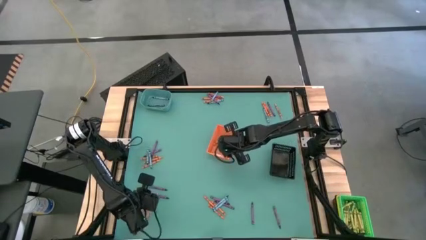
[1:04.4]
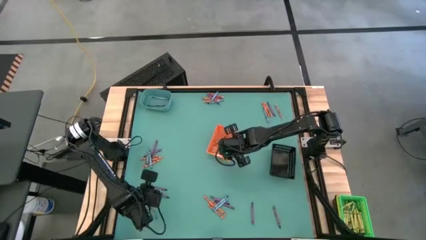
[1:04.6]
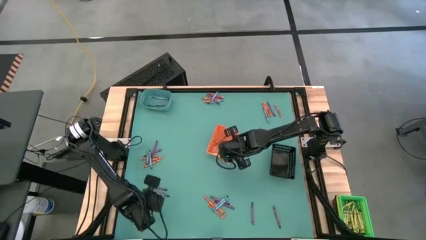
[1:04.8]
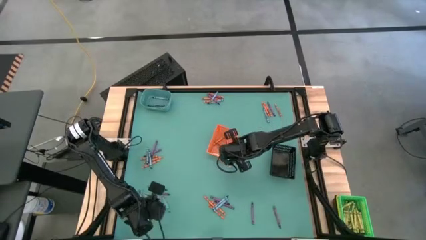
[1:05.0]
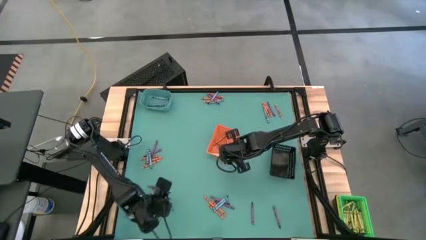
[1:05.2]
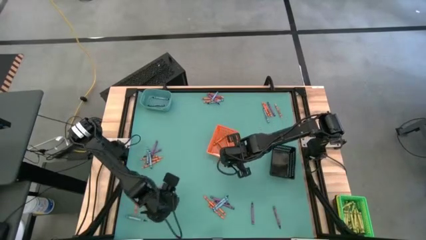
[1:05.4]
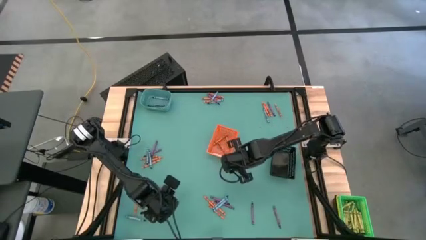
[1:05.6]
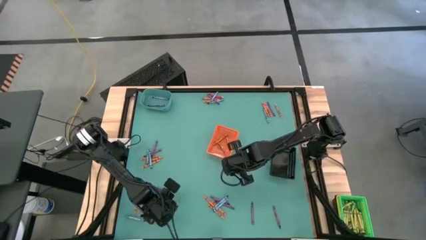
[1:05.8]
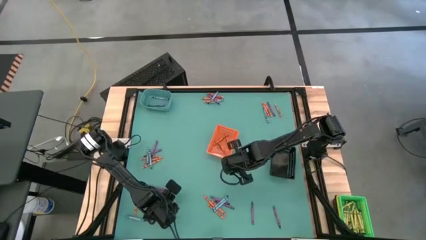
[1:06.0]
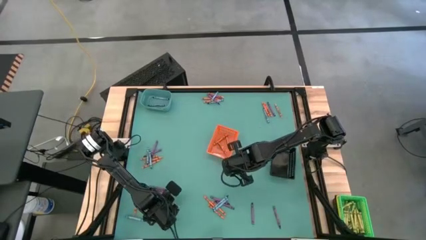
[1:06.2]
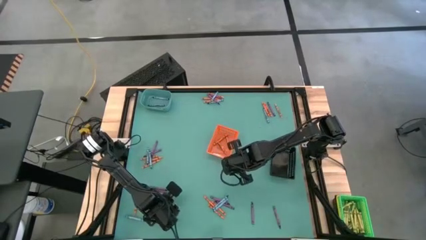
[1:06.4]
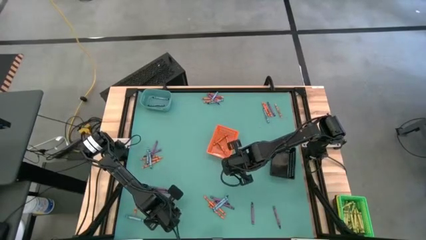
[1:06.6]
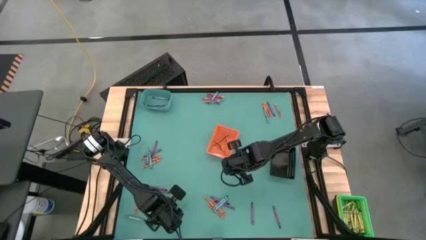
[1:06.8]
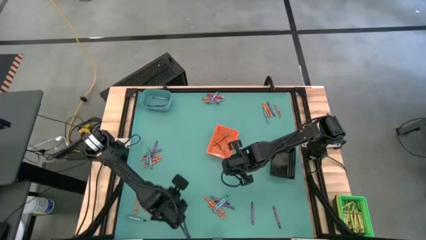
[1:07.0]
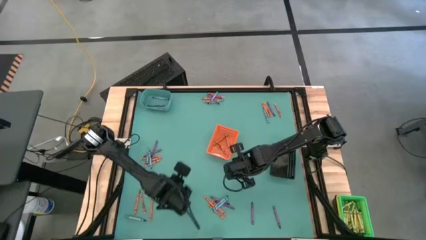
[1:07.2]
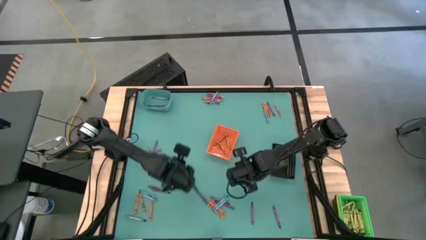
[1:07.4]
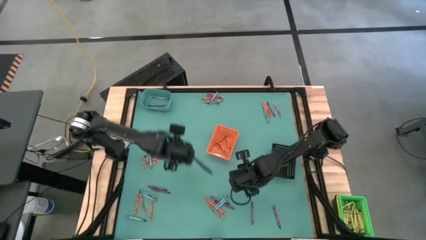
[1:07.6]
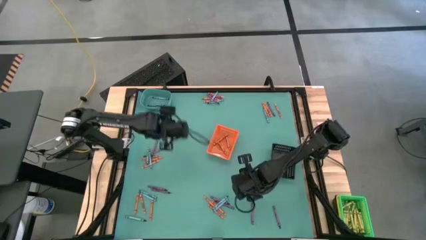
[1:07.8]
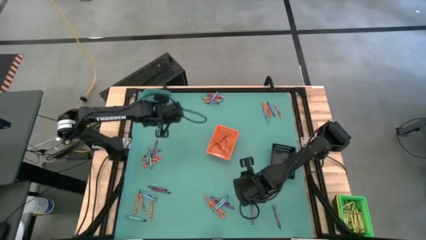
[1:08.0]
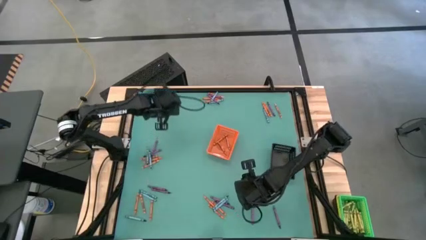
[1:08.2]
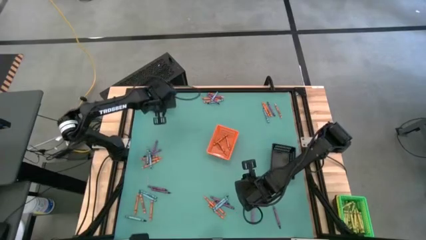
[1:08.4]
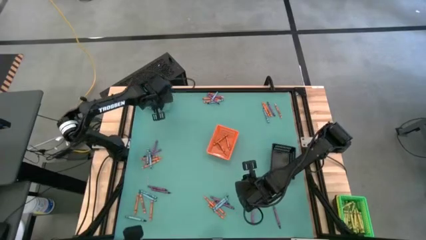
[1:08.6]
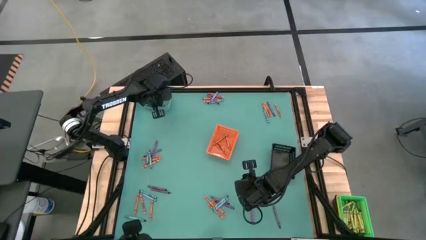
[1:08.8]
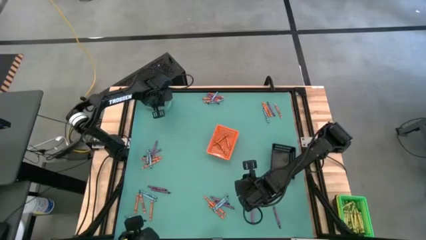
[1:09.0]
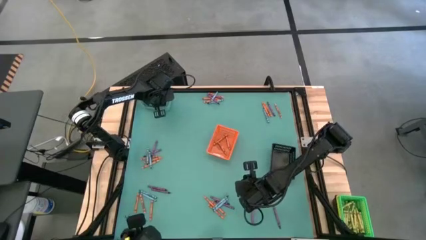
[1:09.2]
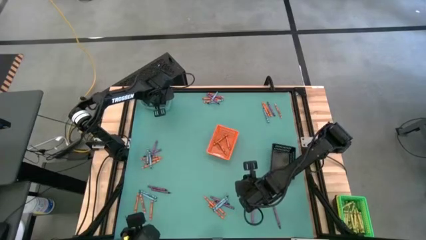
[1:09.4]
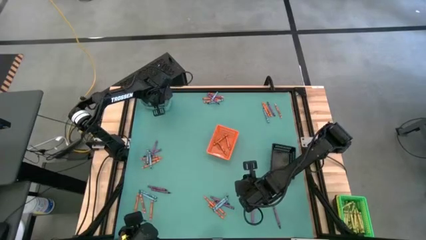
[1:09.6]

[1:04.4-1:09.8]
Task: Sort crayons
Put the blue crayon into the blue bin

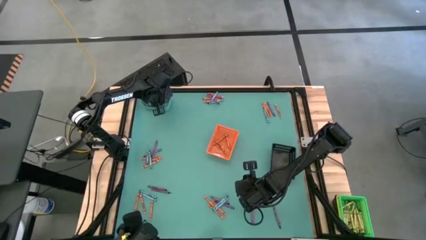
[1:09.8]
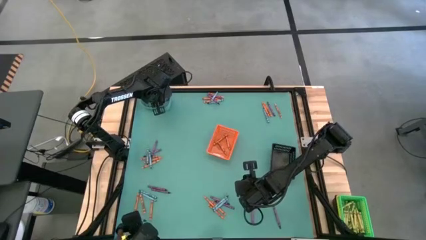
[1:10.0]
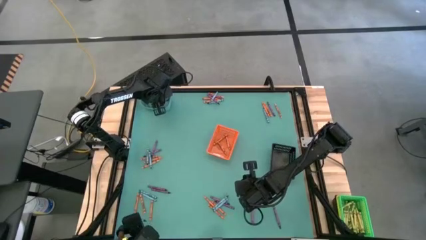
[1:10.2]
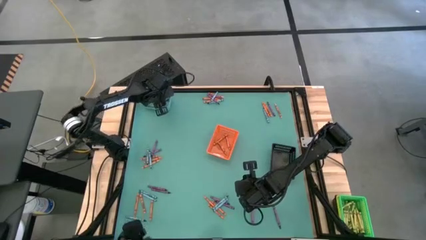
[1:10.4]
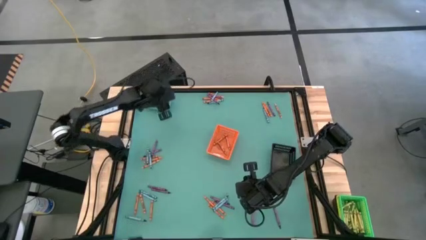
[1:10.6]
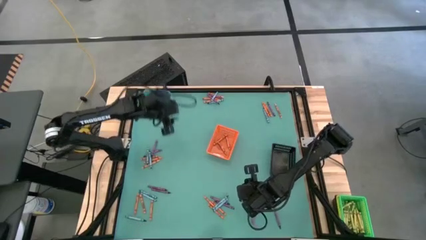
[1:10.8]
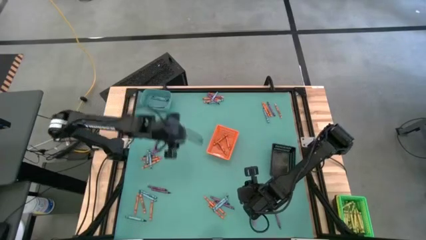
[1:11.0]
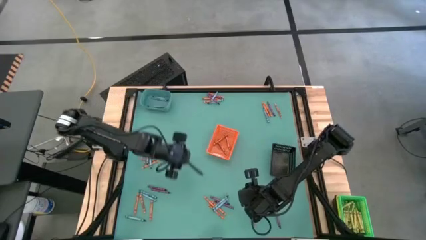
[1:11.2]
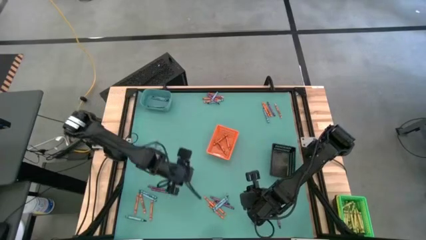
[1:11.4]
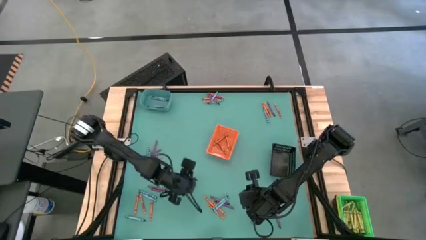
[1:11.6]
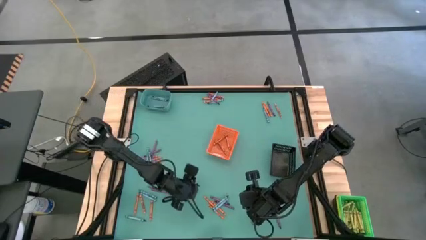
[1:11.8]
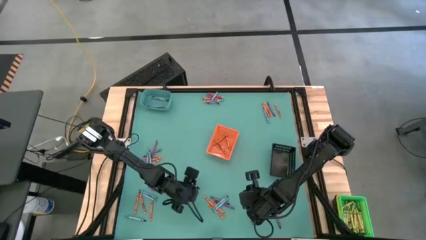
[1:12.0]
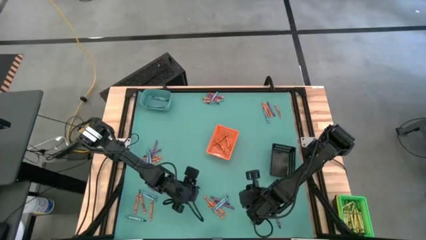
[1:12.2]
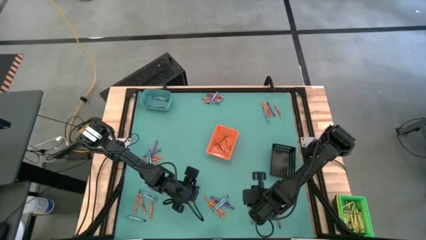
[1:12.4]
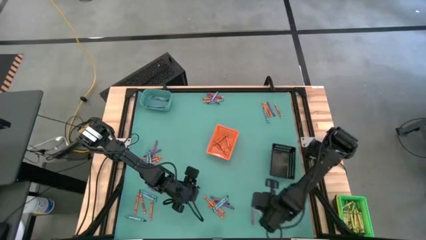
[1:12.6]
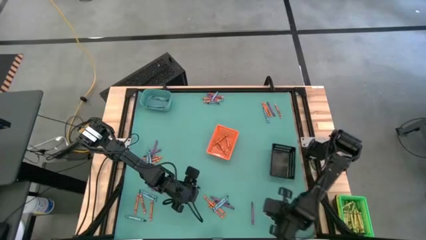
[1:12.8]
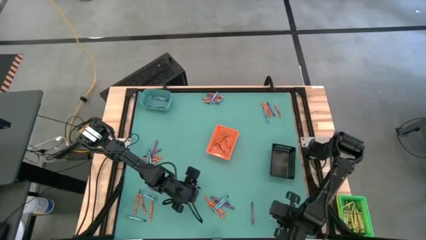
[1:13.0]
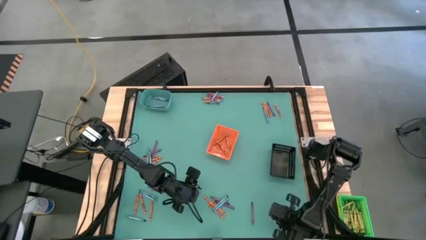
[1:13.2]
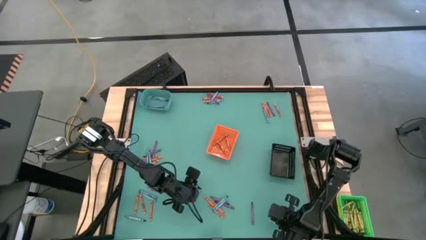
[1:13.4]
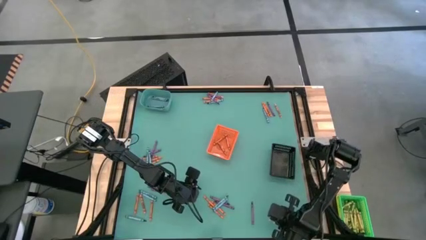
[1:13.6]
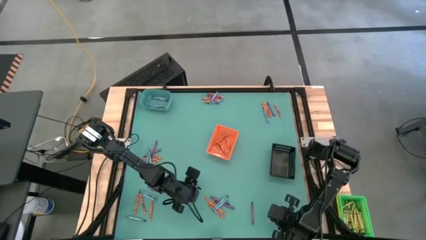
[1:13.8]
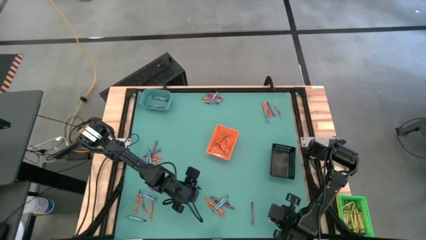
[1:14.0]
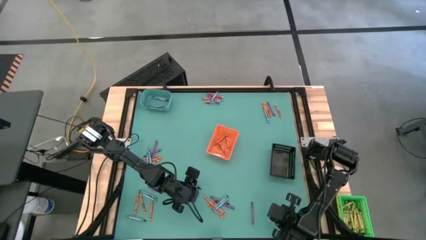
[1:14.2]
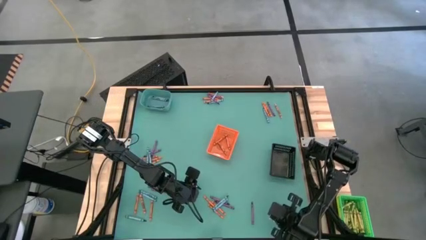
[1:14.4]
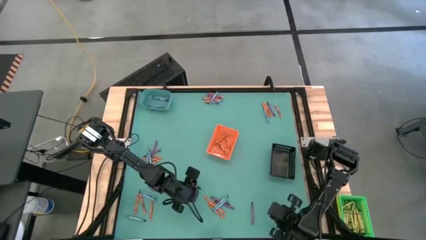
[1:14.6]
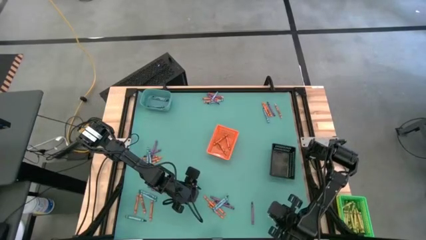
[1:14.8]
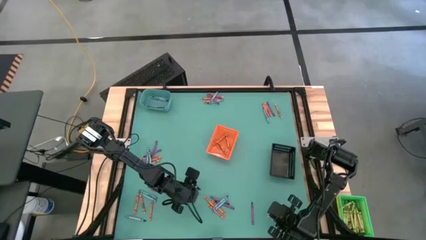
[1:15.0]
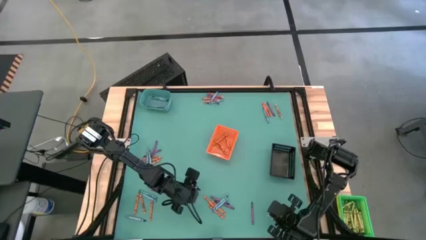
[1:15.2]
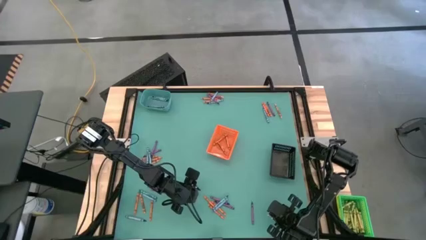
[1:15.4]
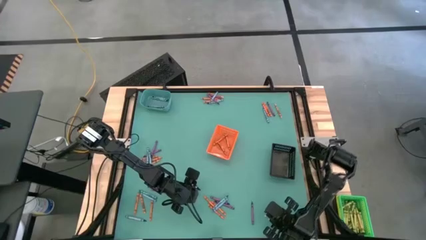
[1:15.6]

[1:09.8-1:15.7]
Put the violet crayon into black bin

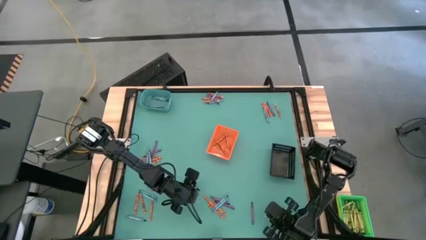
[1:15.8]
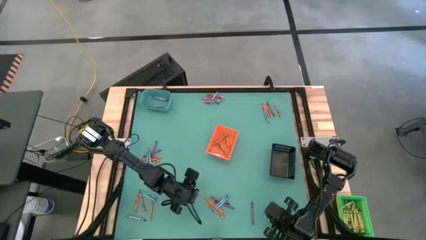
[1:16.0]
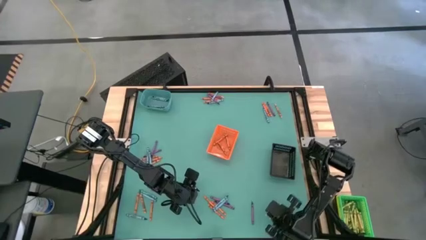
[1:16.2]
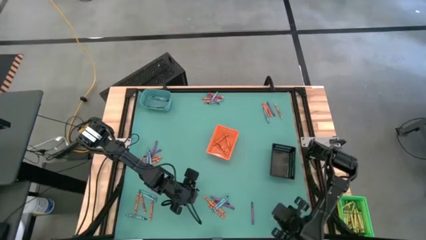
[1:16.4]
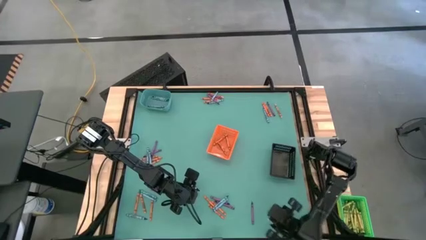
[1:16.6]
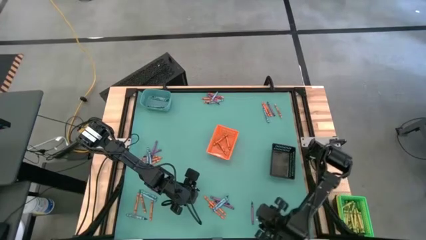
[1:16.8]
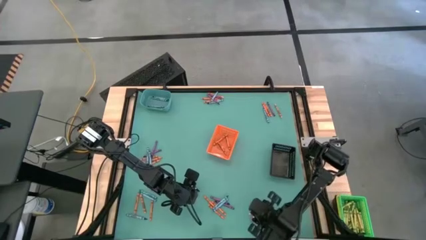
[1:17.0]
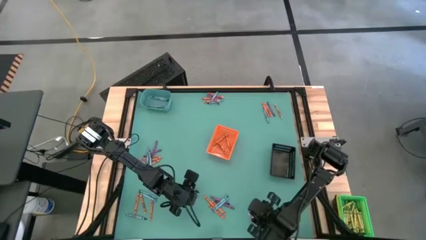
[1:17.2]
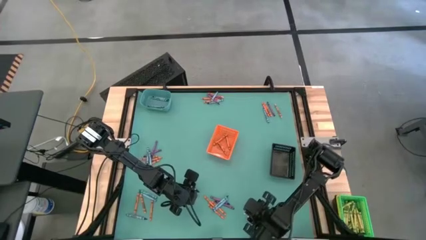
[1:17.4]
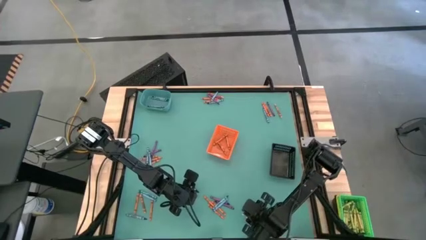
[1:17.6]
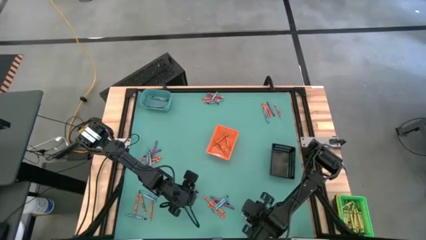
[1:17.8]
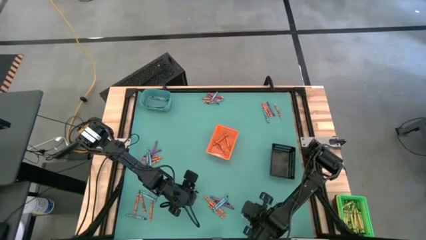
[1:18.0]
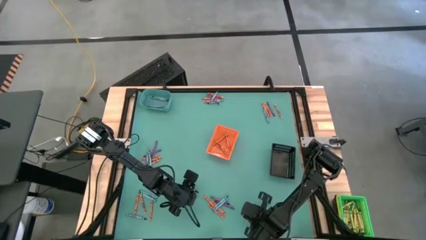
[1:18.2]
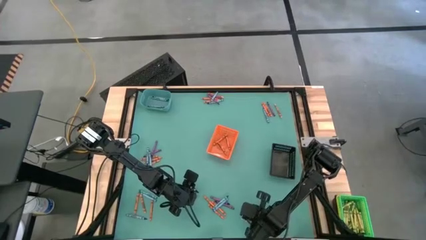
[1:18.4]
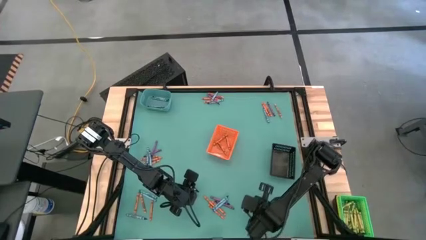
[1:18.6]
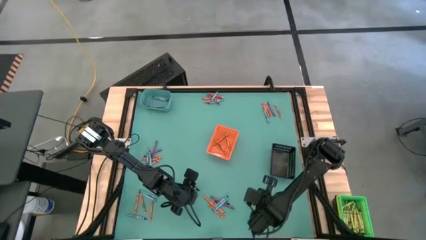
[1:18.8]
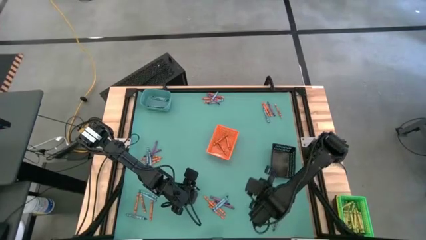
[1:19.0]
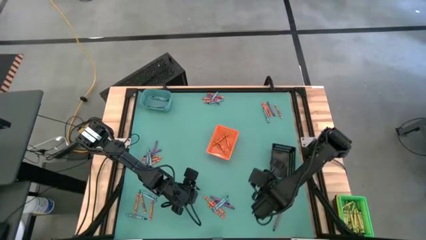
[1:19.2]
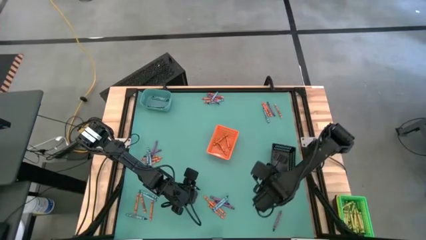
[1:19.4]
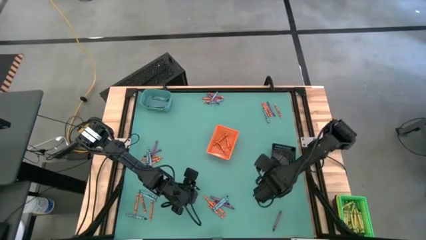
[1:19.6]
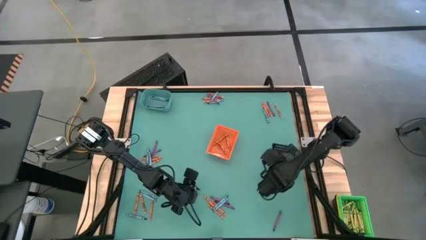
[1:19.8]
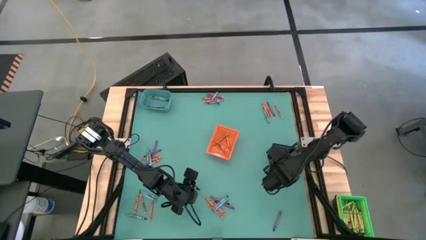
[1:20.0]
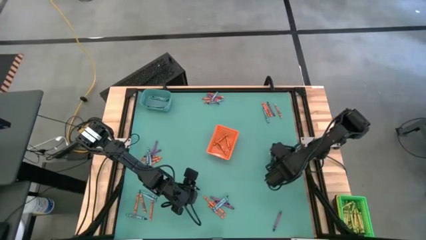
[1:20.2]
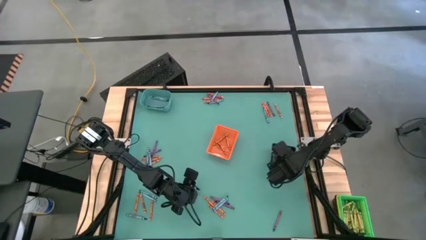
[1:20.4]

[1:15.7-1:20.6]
Put the violet crayon into black bin
